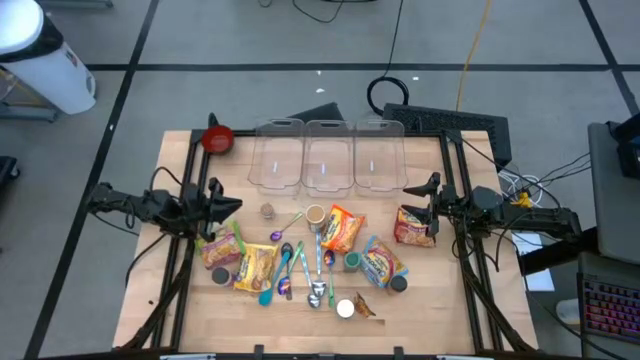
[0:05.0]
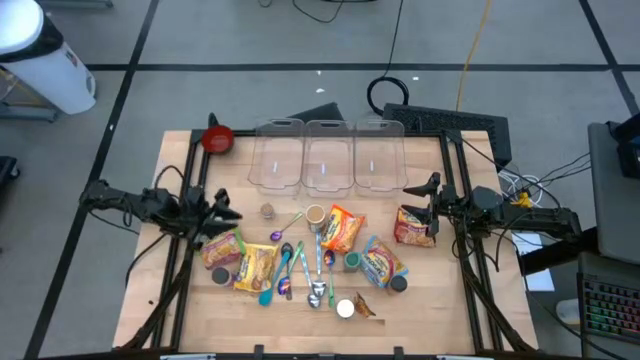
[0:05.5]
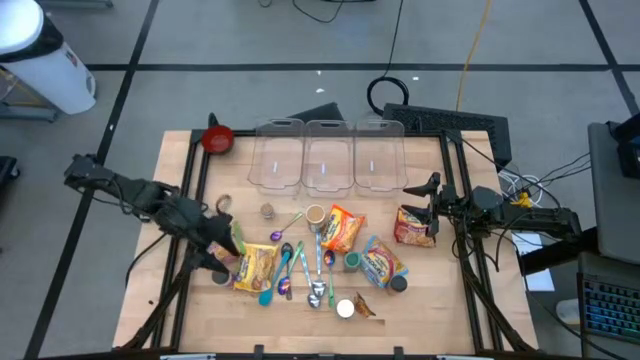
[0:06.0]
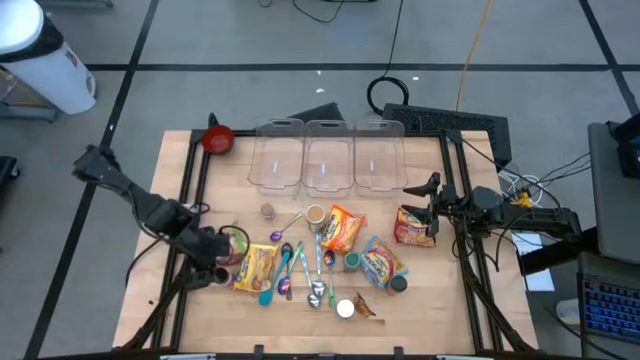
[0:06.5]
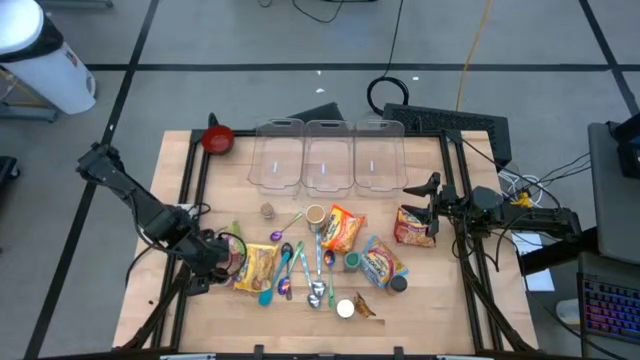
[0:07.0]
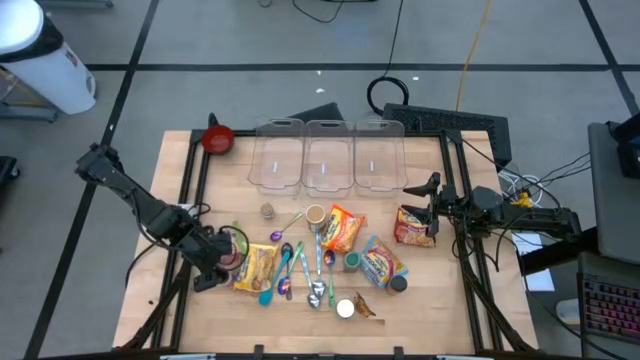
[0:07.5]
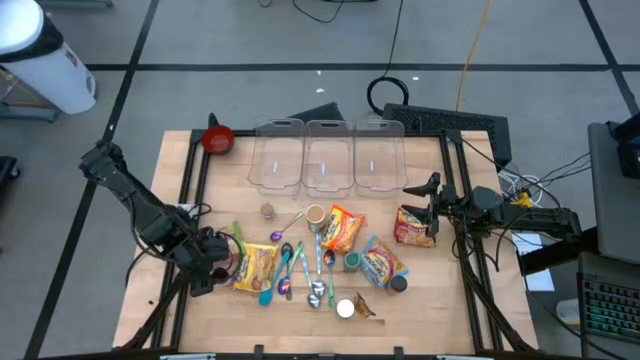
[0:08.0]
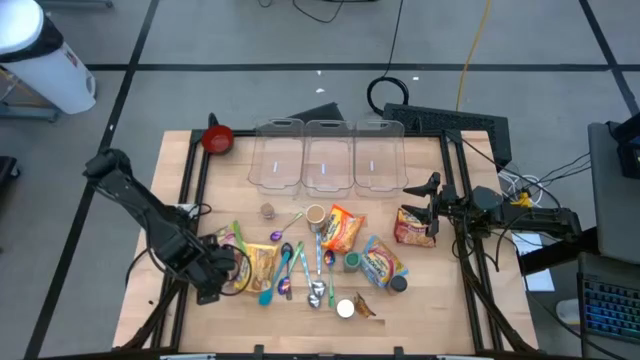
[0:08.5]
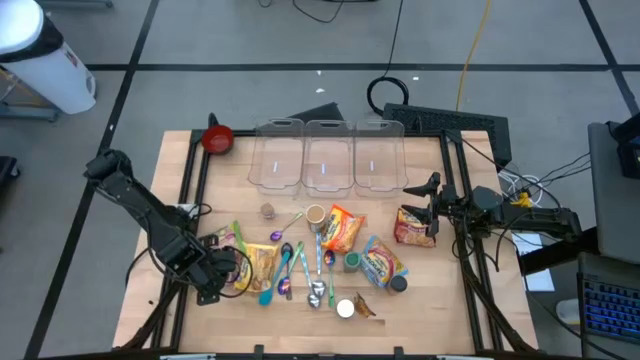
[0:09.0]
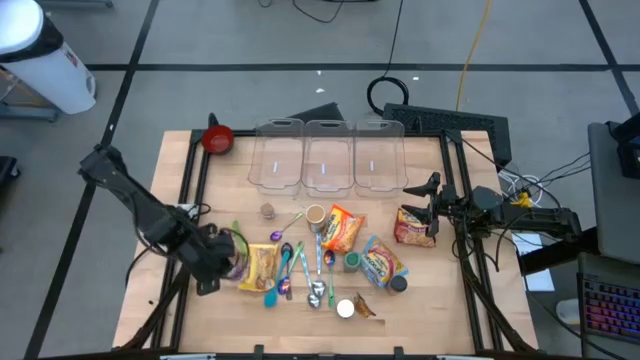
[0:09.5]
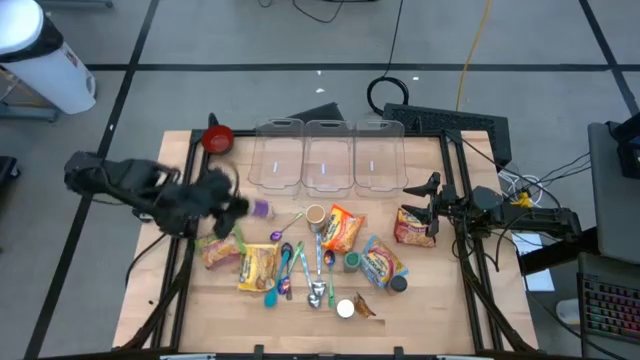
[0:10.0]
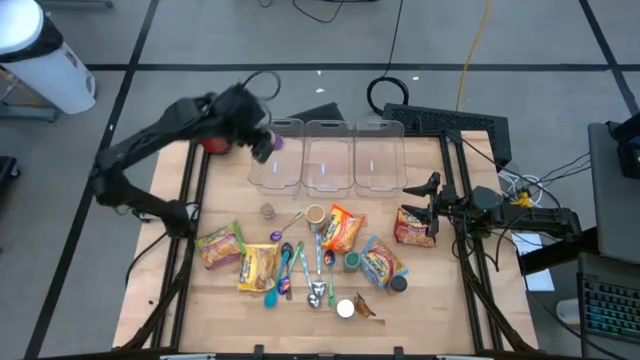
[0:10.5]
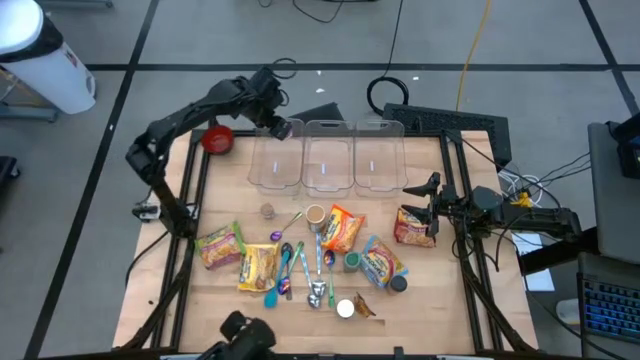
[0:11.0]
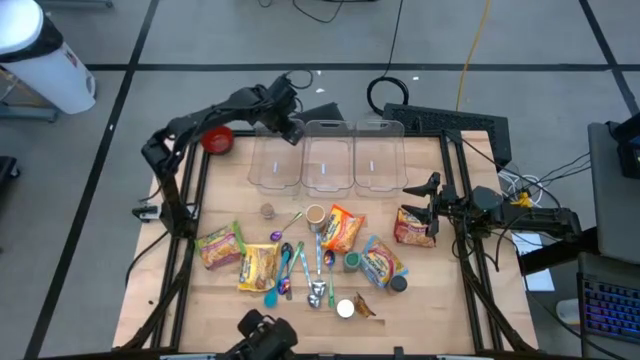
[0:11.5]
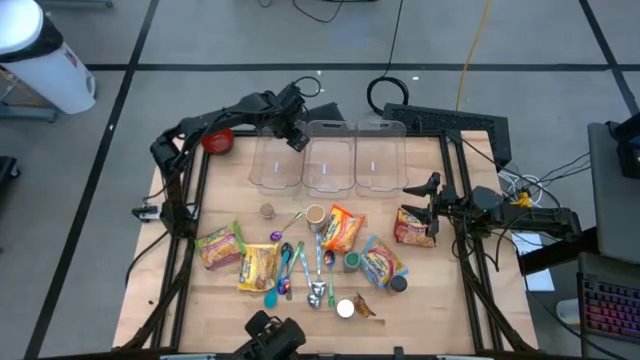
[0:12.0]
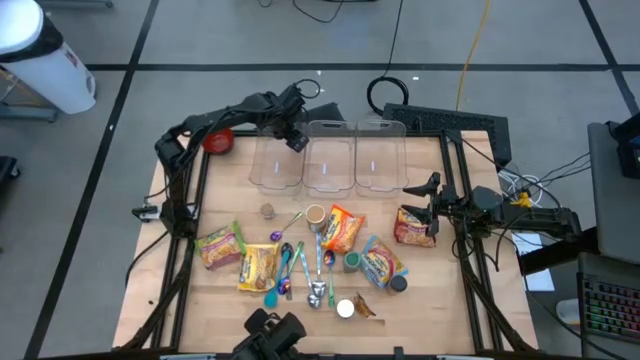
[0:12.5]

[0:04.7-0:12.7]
Task: Pick & Place Food Item
Put the purple seasoning bottle into the left transparent bin

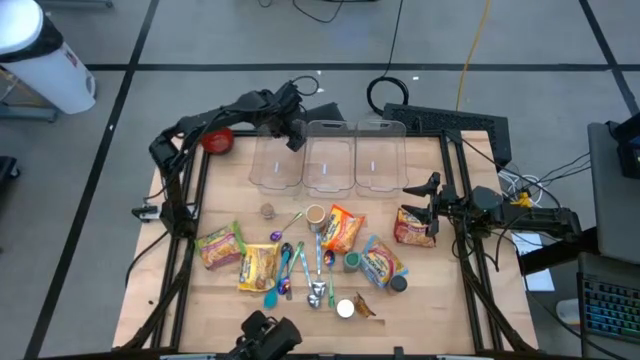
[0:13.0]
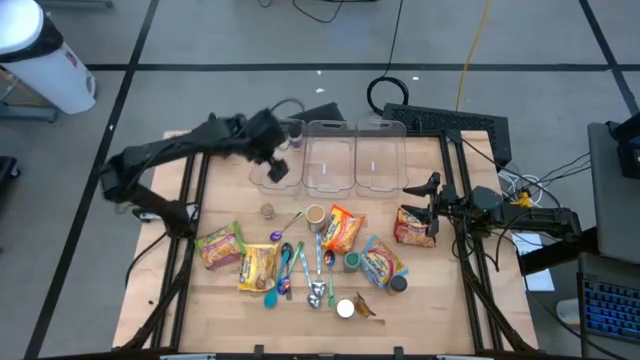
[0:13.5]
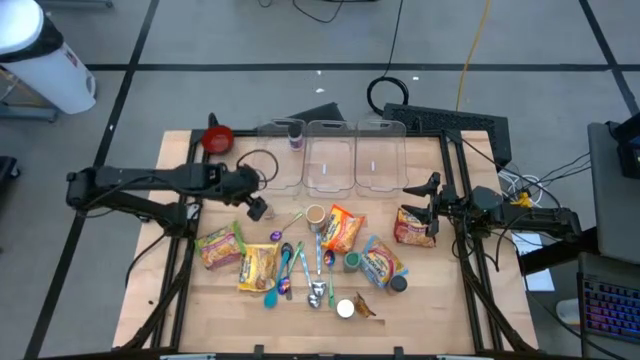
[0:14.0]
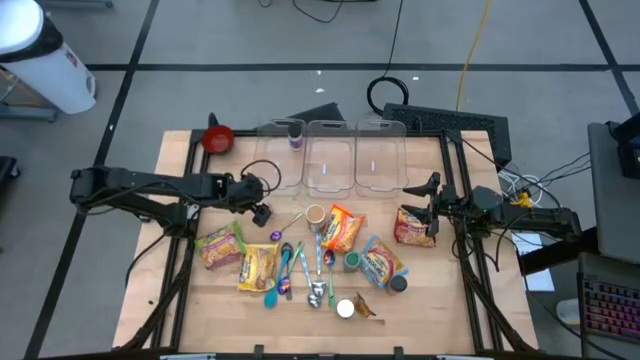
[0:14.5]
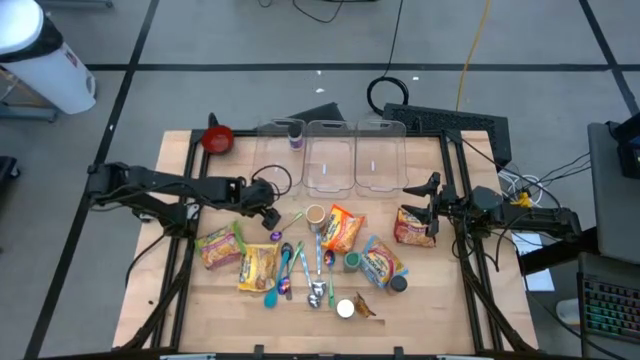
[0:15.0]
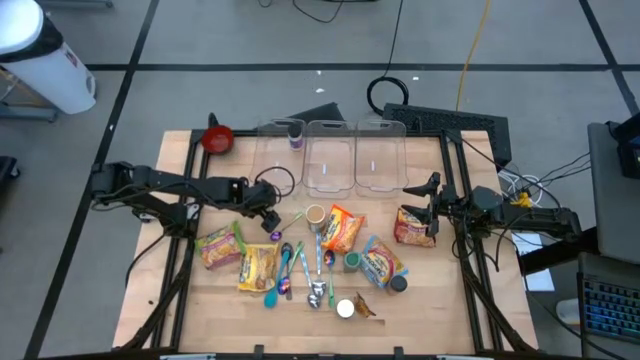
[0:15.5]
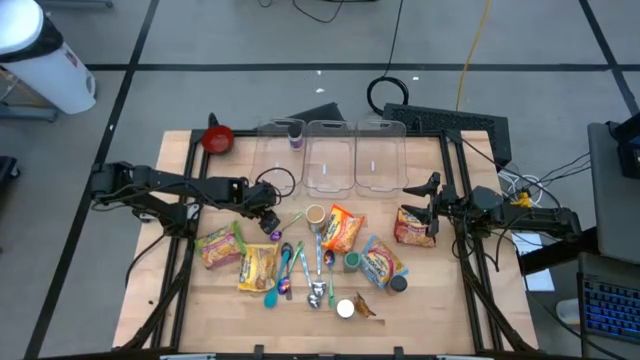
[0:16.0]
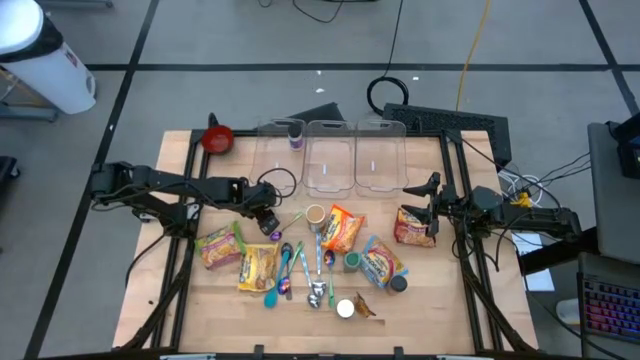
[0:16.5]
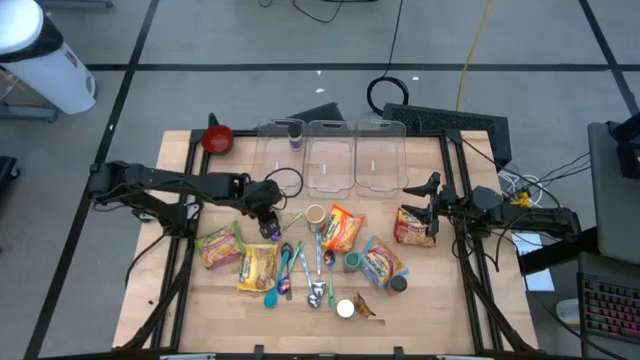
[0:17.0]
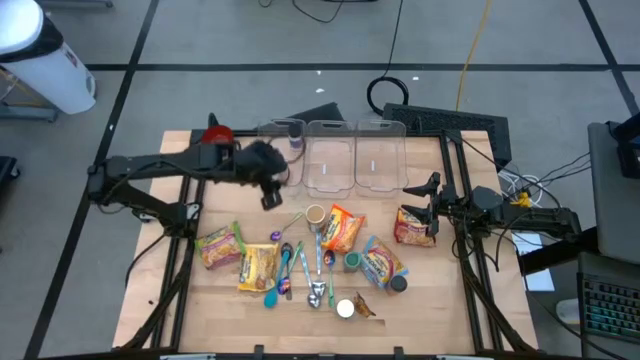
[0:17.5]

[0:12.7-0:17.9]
Put the brown seasoning bottle into the left transparent bin

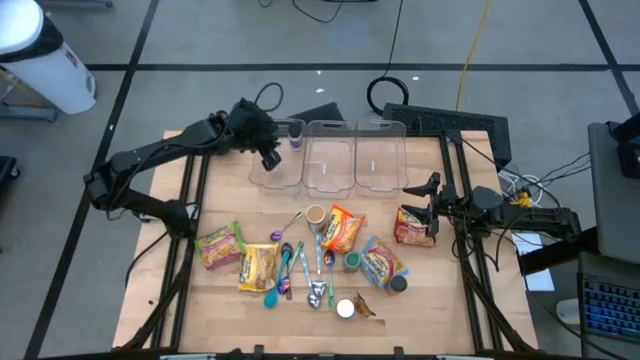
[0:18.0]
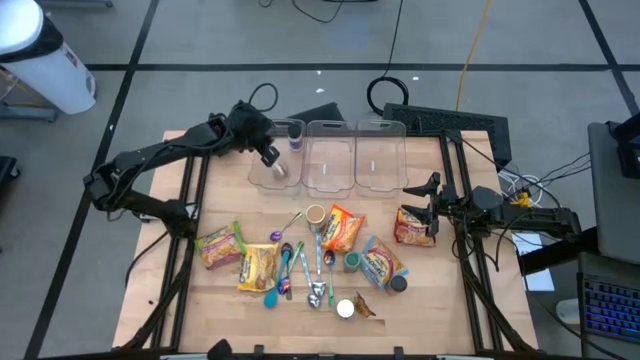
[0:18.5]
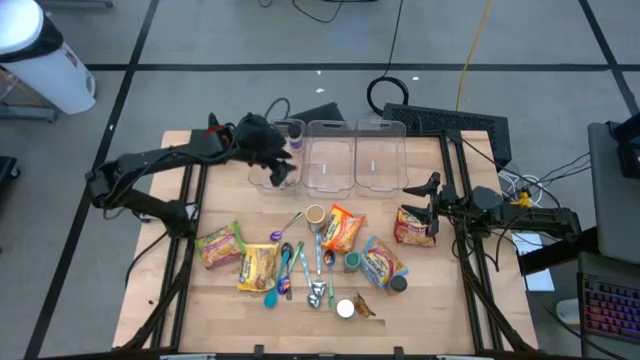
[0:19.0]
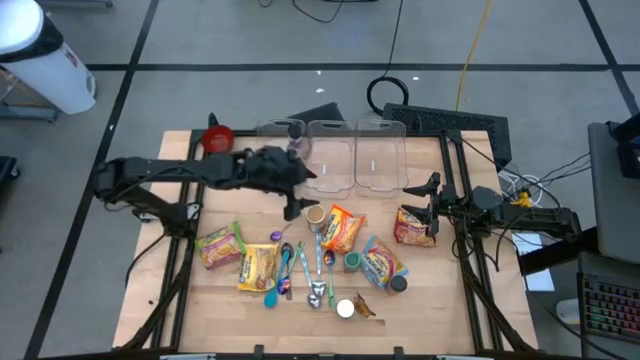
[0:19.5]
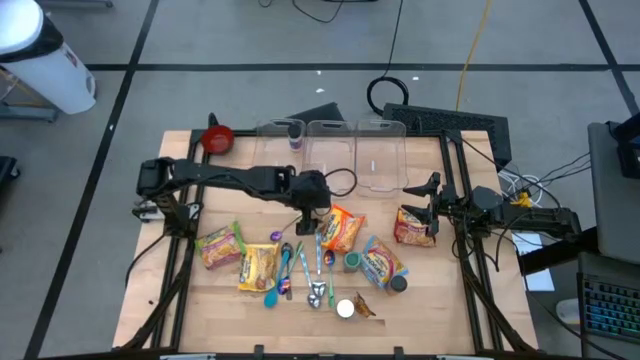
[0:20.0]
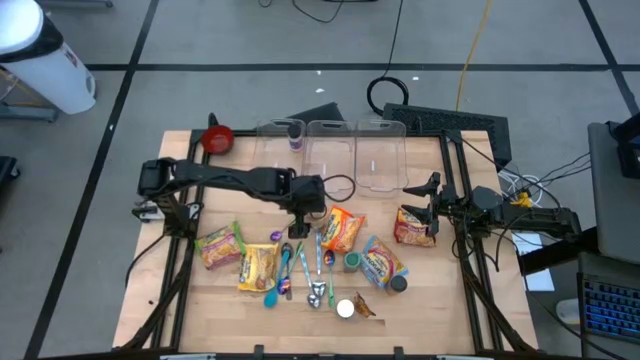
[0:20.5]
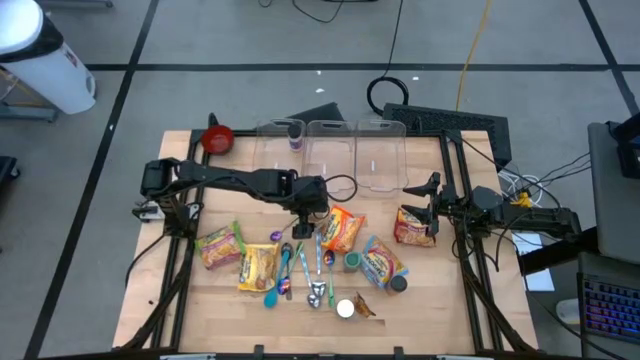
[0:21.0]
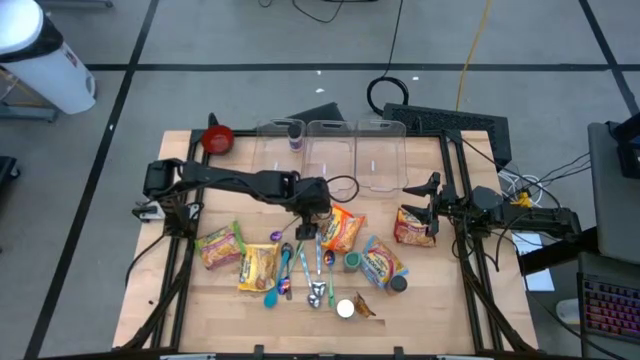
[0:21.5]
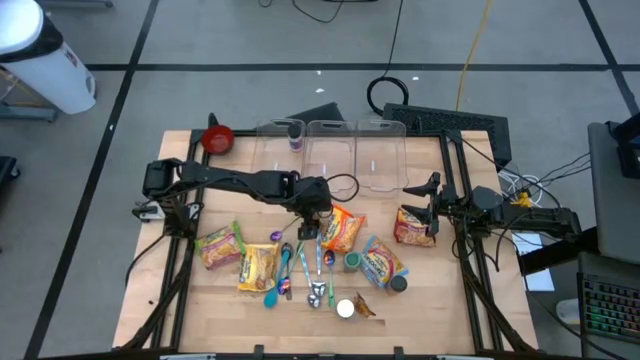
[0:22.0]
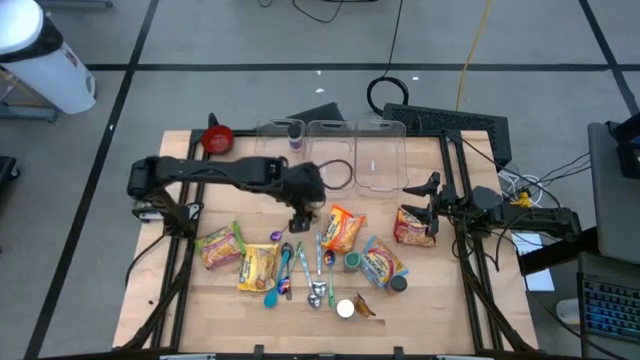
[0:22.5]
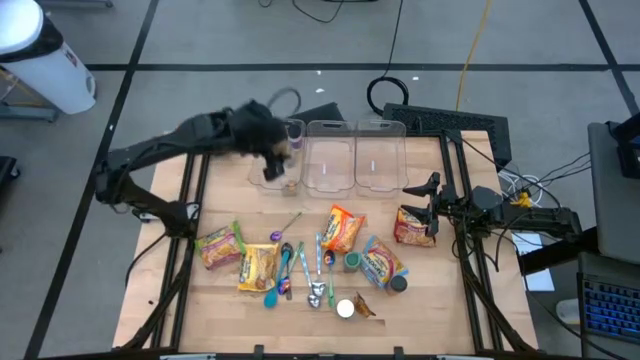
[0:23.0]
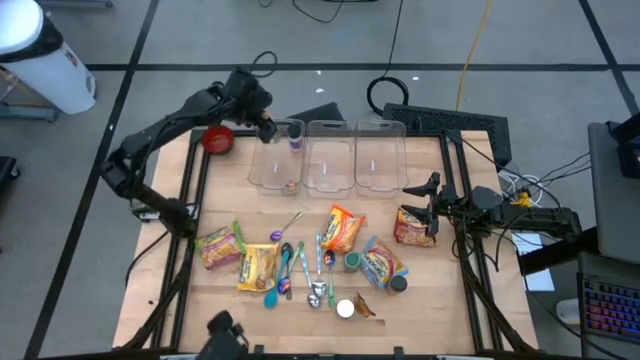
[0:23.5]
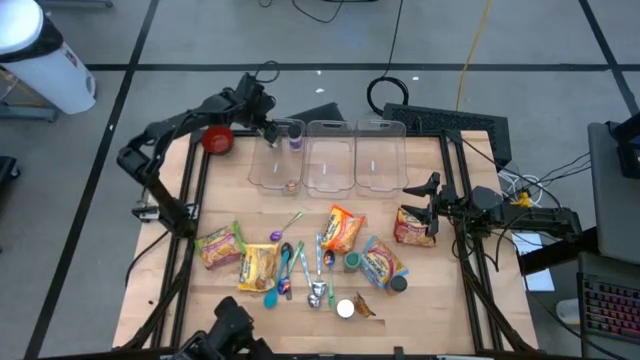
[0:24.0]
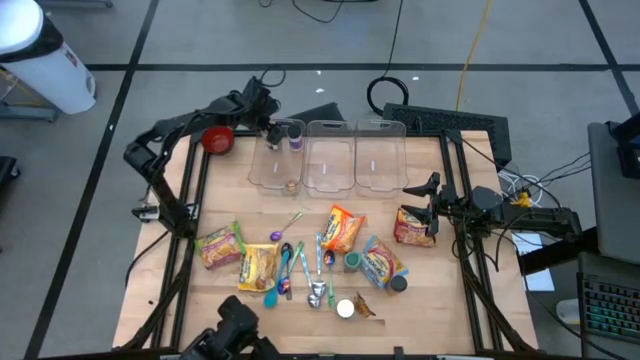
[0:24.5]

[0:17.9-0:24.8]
Put the golden seasoning bottle into the left transparent bin
